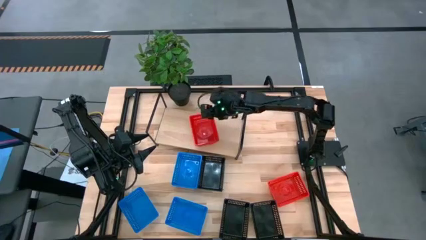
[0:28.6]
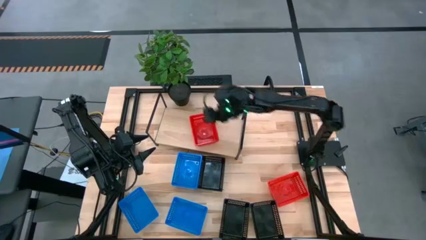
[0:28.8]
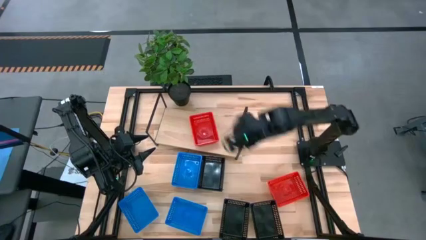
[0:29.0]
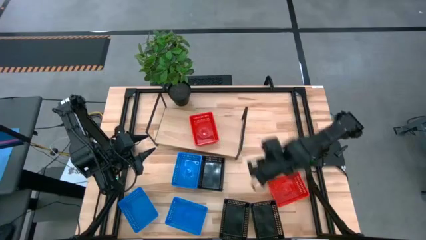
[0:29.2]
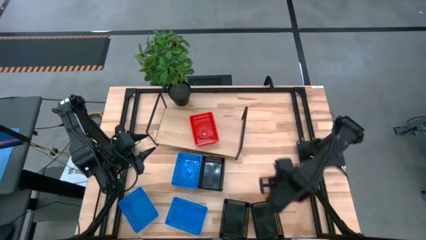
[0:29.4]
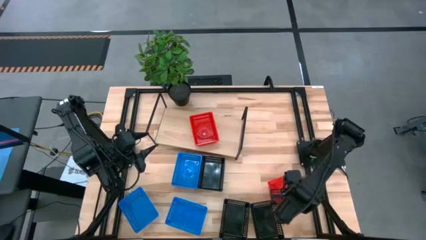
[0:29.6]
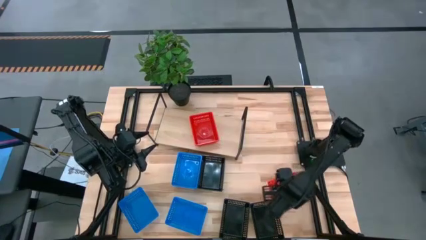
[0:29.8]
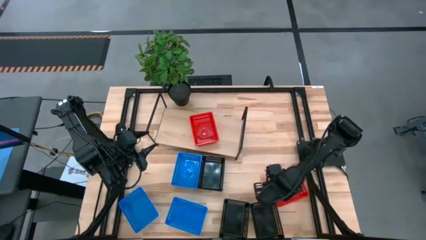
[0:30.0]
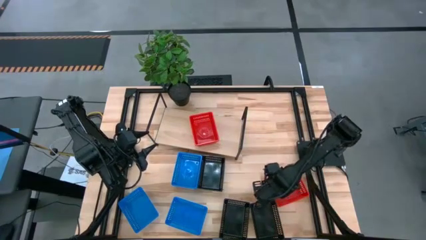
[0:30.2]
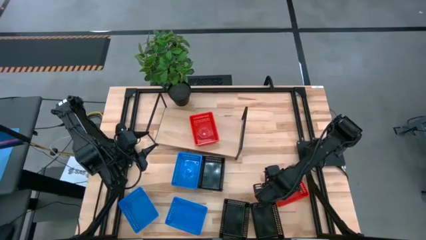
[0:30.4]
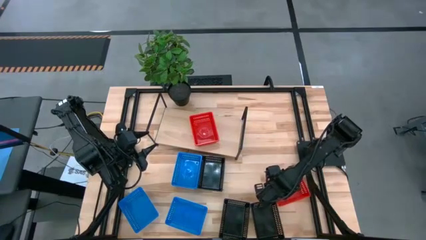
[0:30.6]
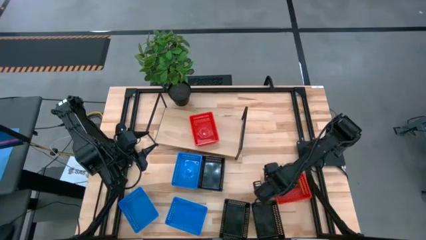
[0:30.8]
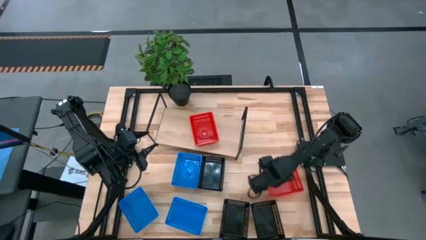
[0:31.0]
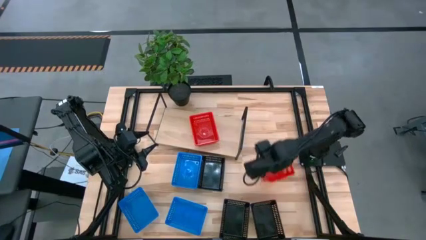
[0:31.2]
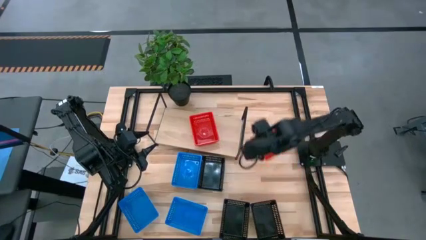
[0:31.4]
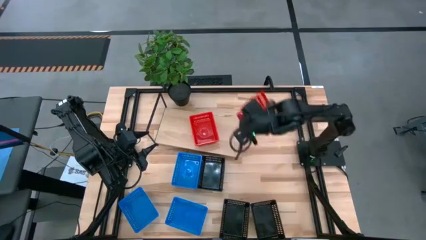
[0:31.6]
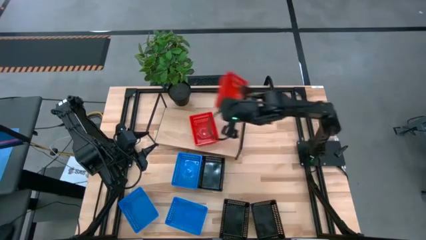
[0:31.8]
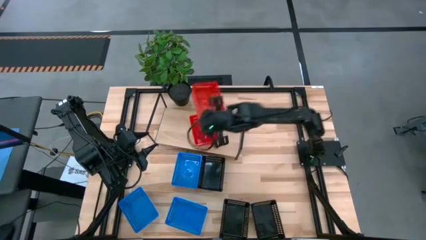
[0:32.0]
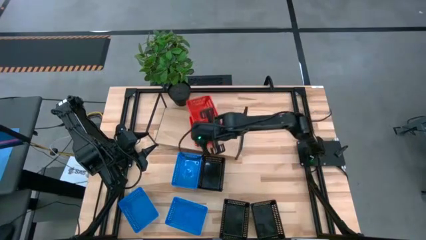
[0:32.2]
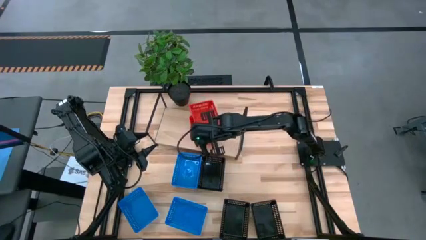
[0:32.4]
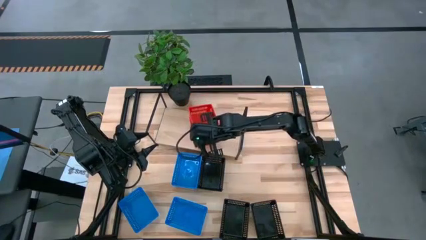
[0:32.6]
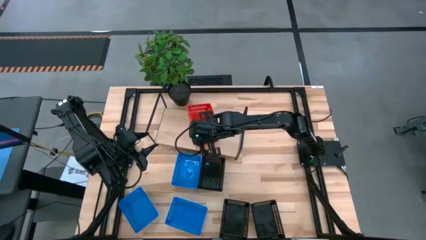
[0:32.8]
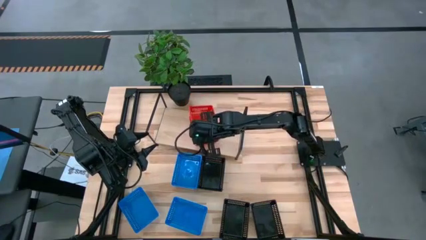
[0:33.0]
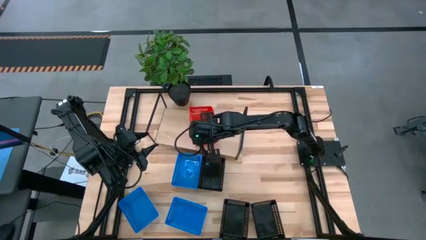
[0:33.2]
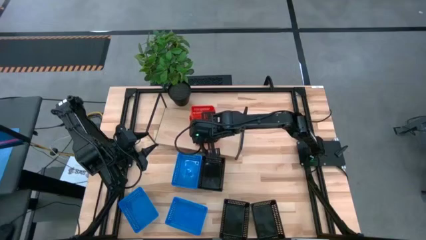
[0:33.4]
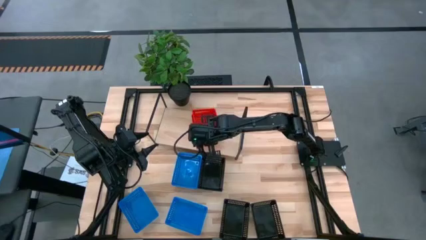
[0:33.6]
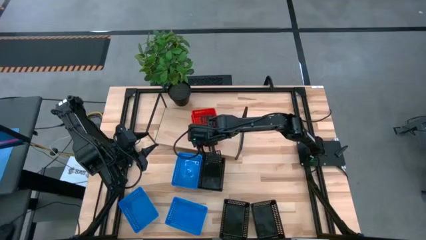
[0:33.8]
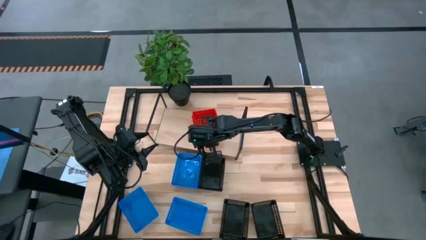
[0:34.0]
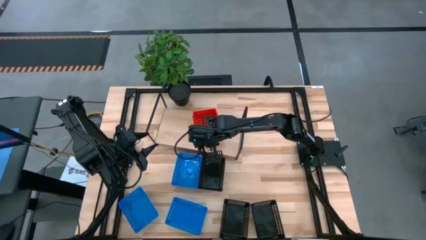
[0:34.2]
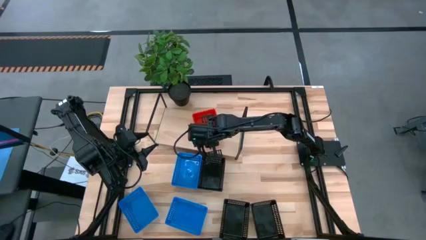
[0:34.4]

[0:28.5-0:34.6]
Task: Stack baskets on shelf by color
Stack the red basket on top of the stacked red basket on the shelf

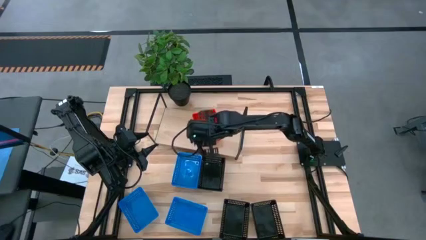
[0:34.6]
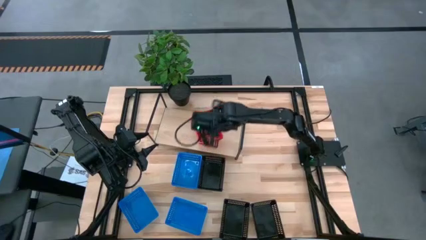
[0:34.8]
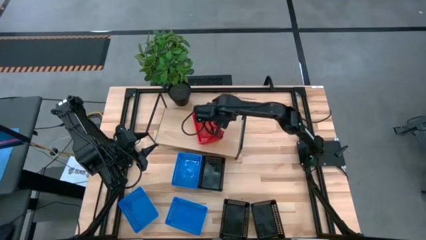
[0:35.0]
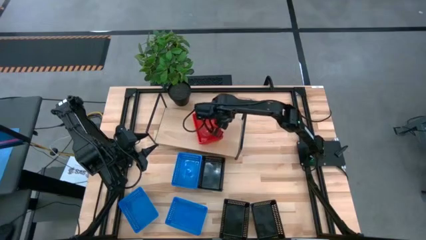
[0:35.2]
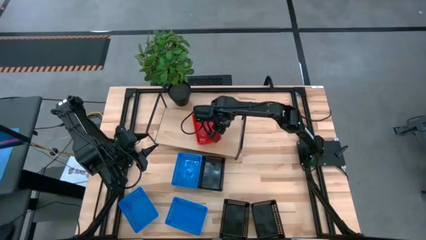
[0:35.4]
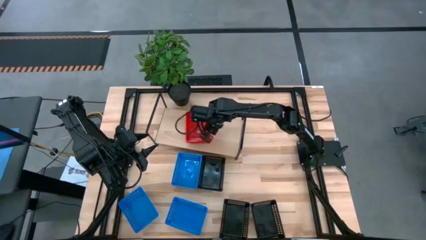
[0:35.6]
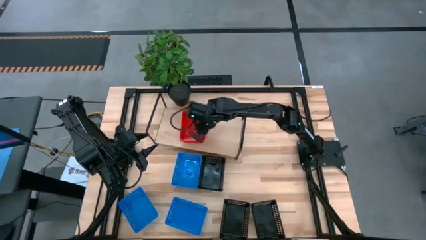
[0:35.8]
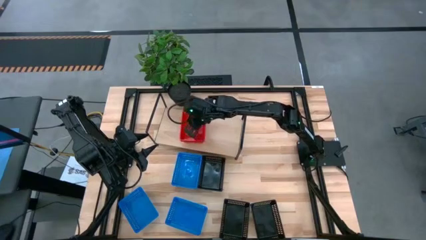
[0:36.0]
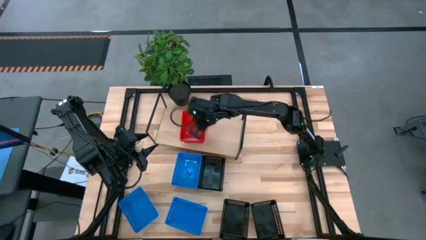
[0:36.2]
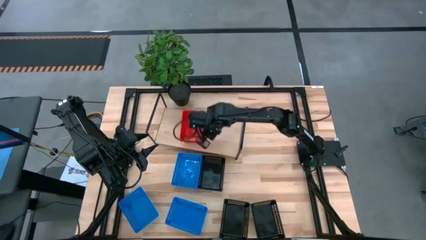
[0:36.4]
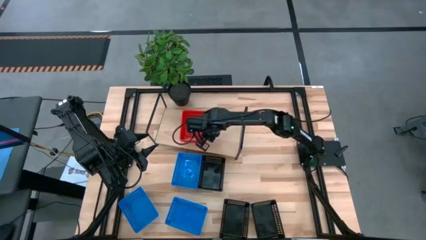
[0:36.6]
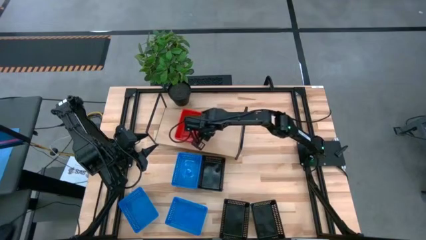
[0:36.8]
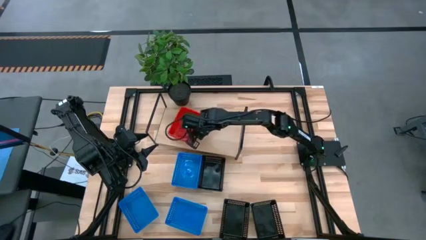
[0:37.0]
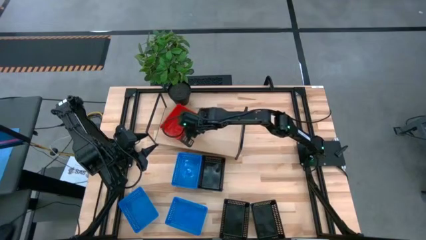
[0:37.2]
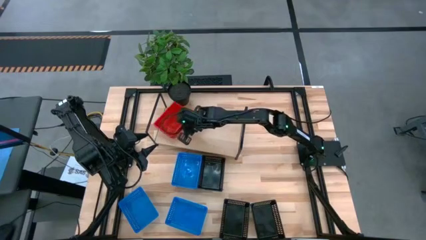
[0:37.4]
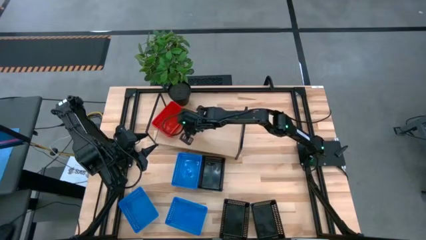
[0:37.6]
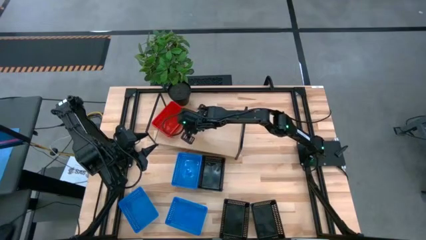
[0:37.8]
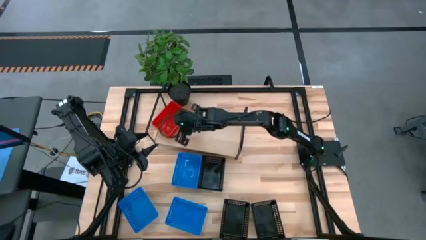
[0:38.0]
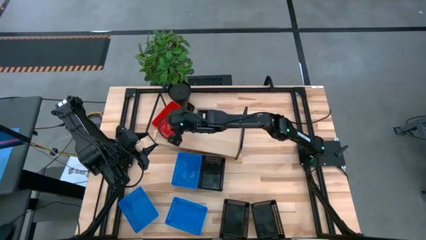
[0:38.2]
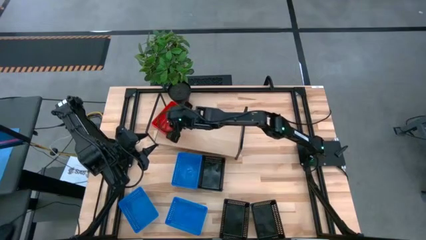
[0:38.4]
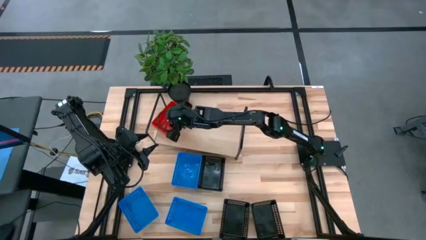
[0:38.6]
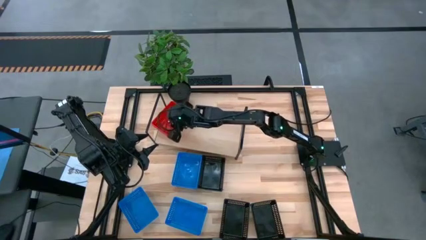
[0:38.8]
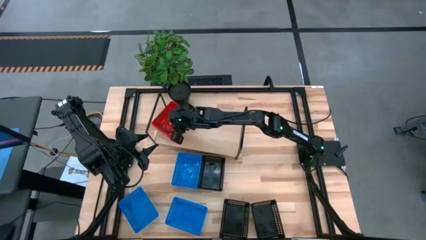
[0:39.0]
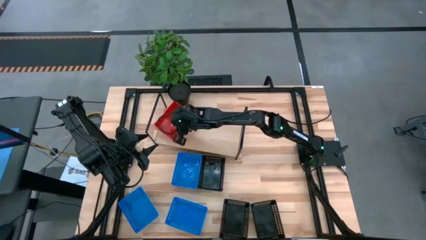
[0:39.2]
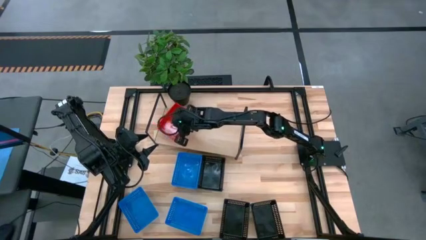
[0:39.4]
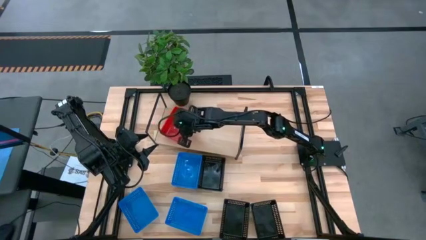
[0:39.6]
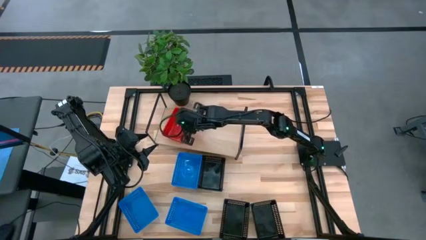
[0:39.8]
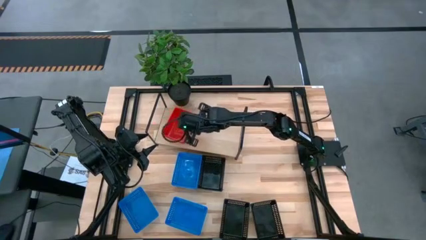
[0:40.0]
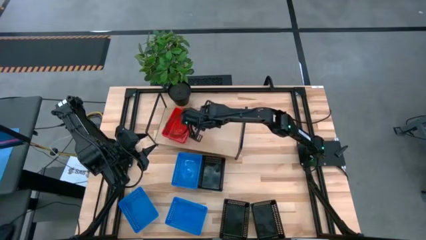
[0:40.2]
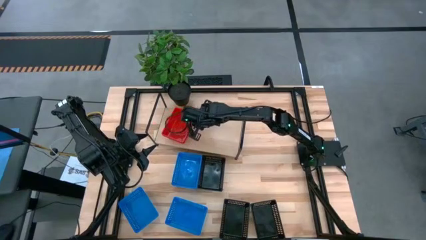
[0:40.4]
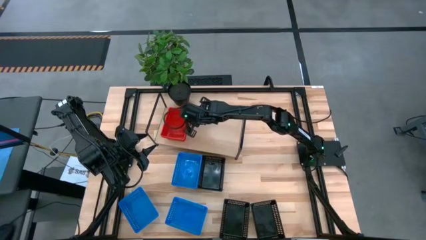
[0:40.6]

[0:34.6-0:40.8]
Move the stacked red basket to the left corner of the shelf

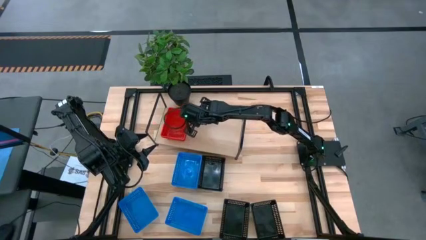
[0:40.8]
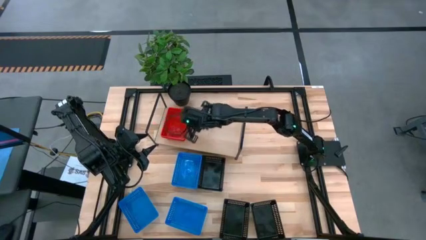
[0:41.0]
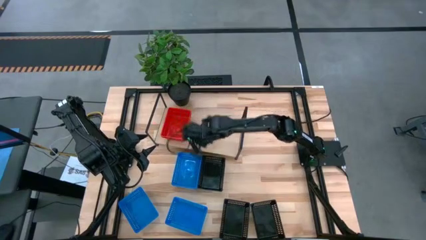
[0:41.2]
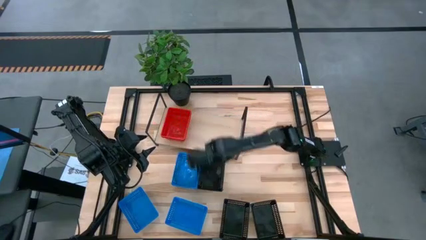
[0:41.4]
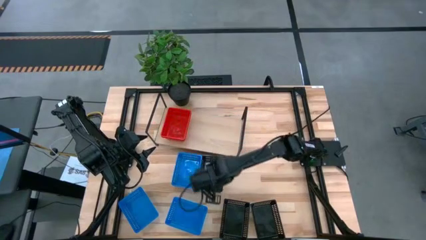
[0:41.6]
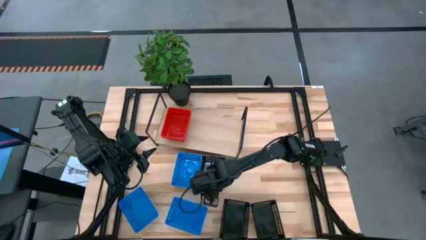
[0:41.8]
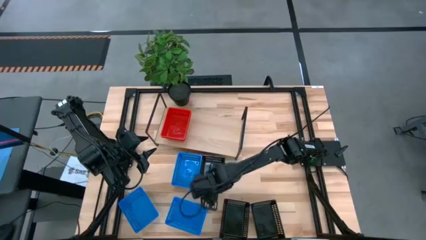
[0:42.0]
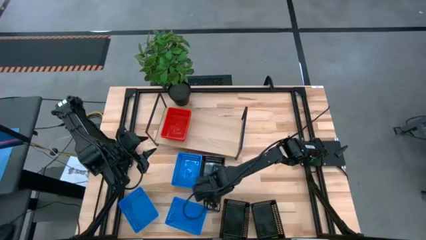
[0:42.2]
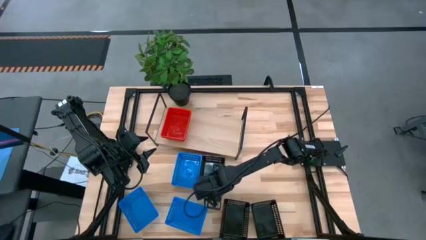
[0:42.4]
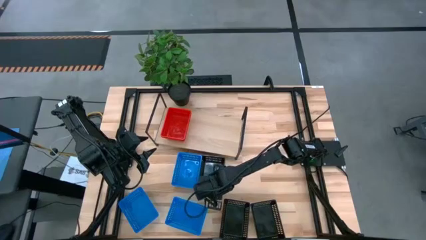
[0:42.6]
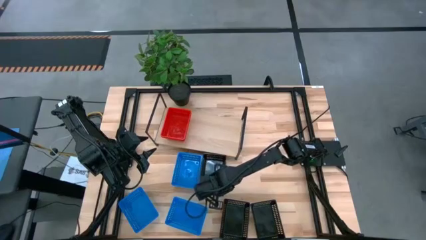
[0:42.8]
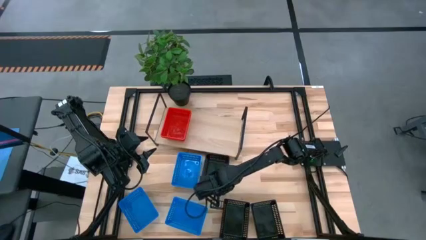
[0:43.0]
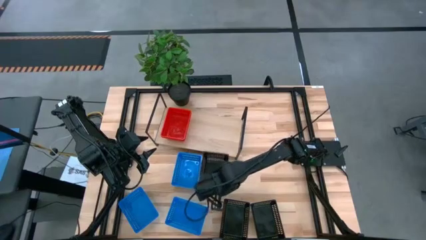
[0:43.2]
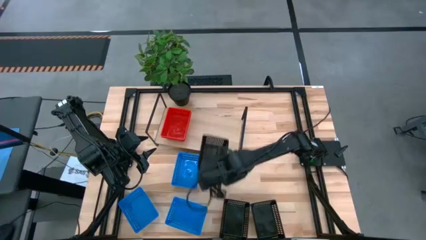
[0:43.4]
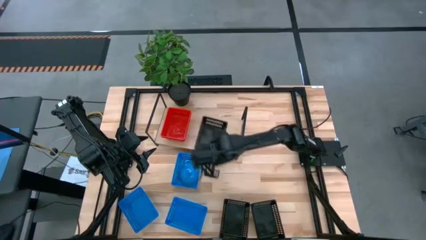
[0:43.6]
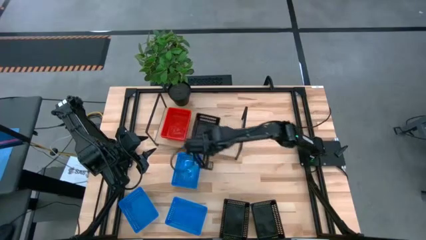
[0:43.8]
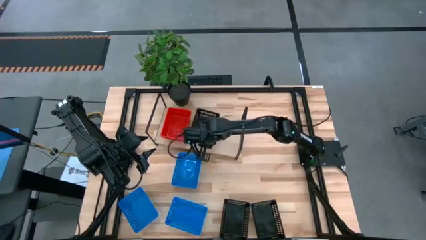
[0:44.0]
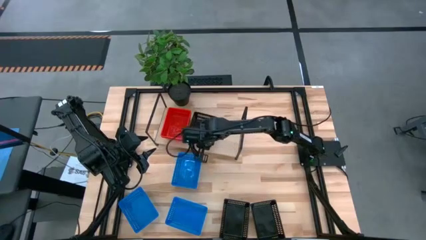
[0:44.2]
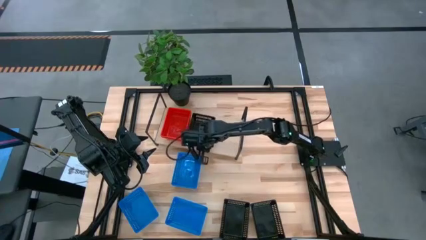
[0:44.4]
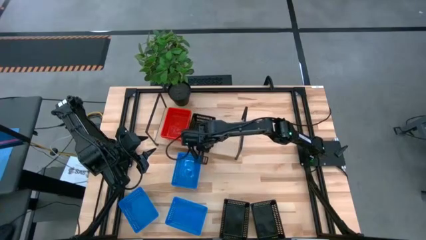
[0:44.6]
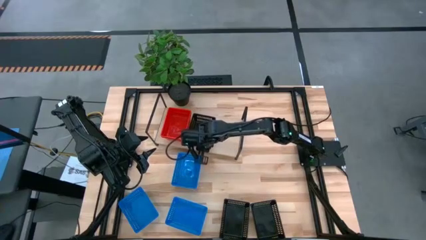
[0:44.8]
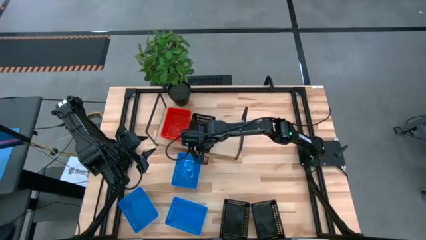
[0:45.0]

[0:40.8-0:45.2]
Put the top black basket on the shelf
